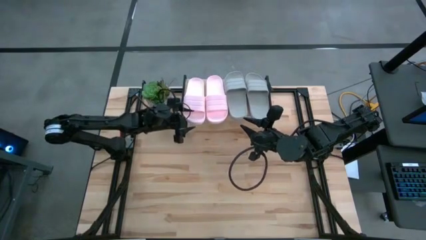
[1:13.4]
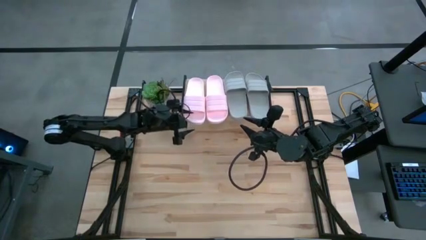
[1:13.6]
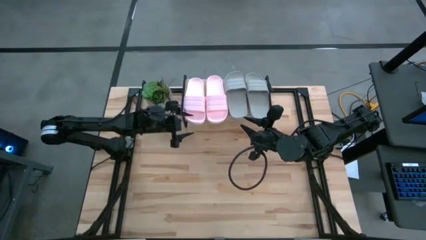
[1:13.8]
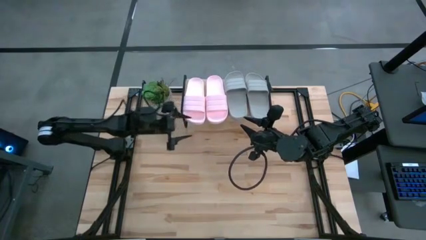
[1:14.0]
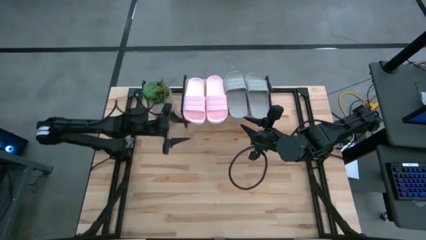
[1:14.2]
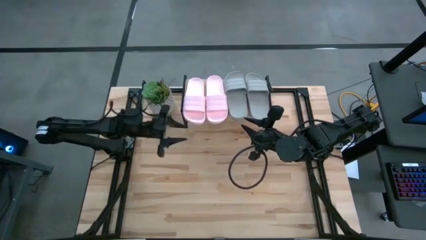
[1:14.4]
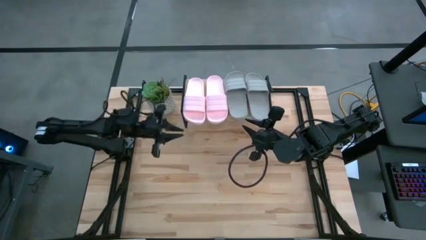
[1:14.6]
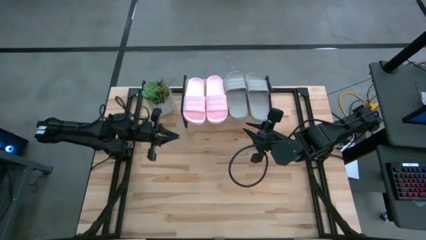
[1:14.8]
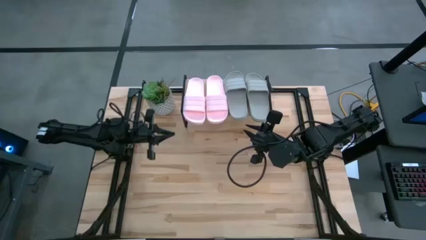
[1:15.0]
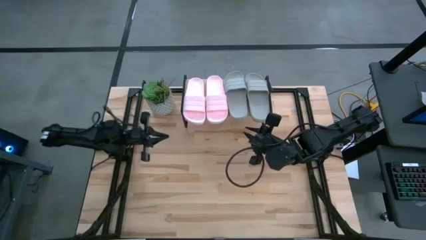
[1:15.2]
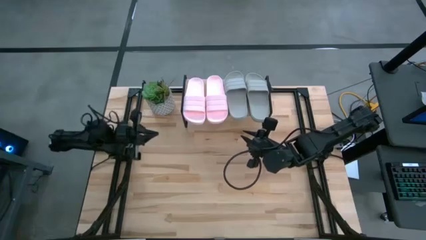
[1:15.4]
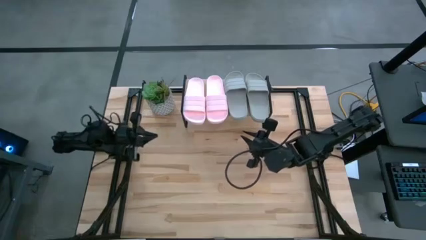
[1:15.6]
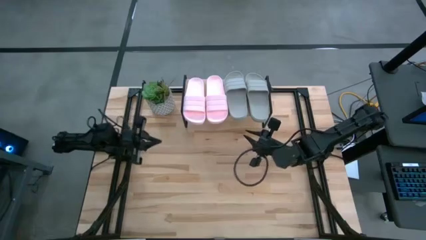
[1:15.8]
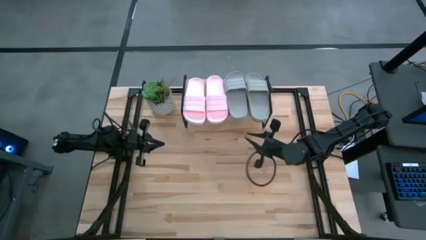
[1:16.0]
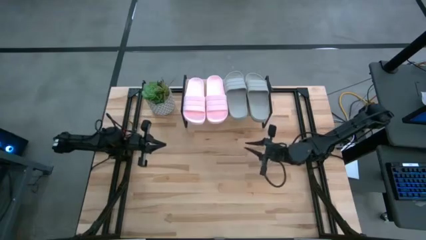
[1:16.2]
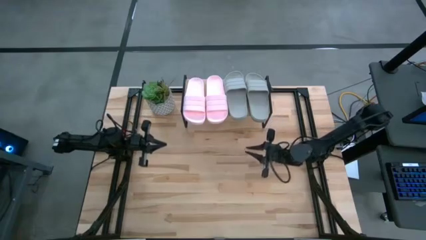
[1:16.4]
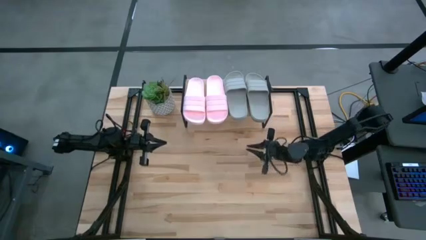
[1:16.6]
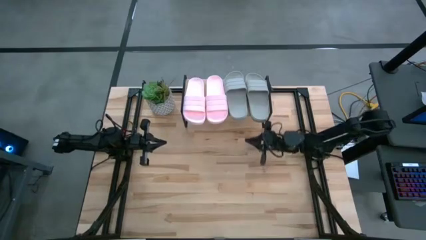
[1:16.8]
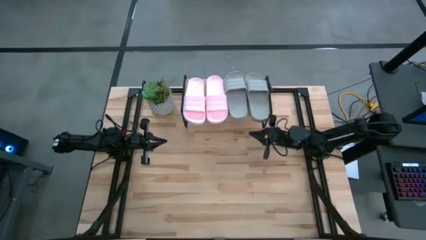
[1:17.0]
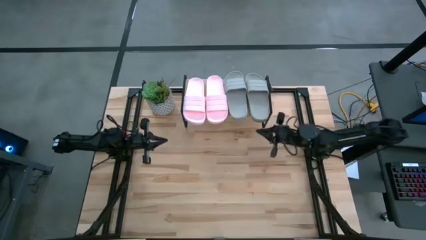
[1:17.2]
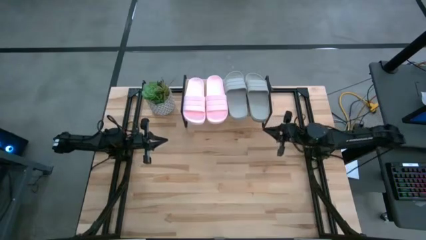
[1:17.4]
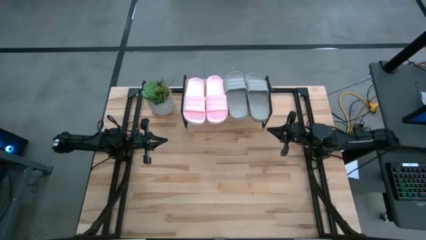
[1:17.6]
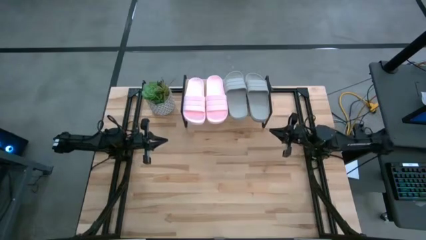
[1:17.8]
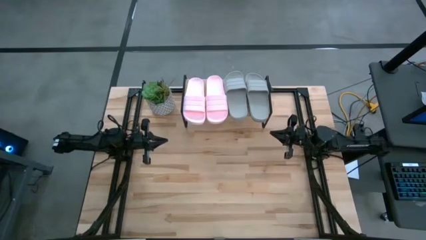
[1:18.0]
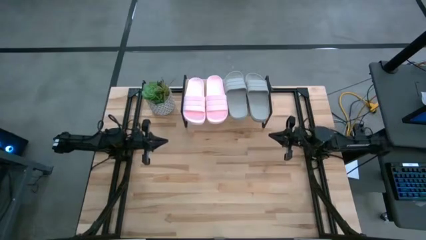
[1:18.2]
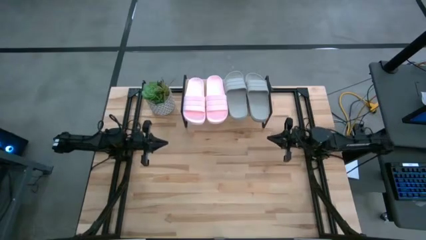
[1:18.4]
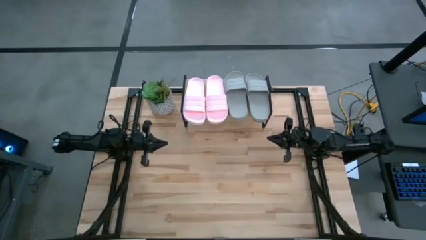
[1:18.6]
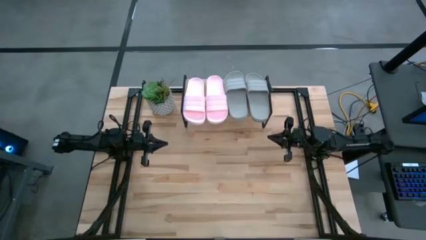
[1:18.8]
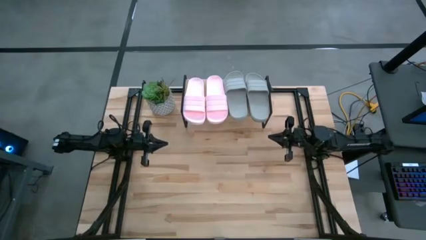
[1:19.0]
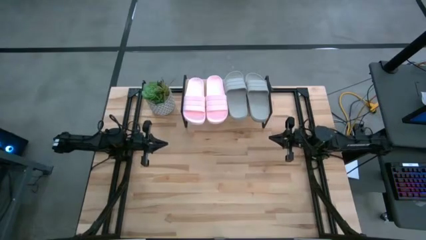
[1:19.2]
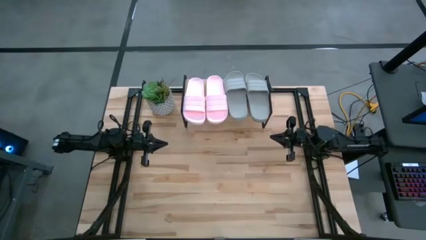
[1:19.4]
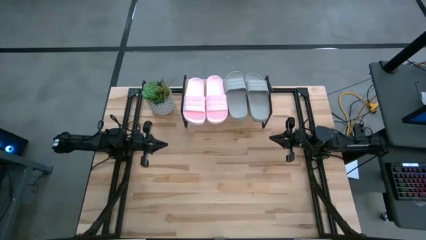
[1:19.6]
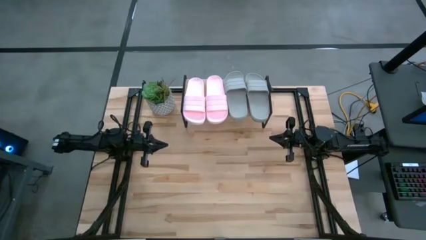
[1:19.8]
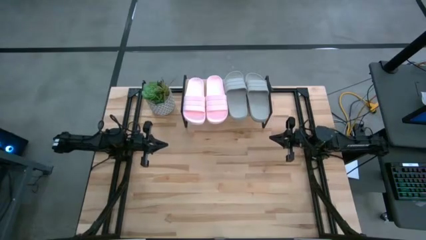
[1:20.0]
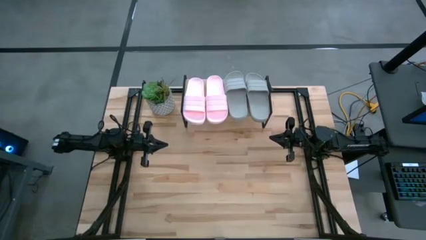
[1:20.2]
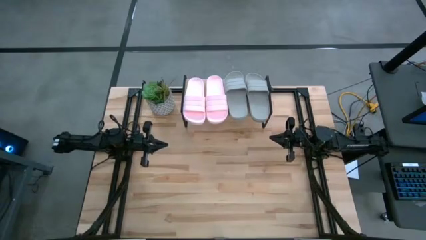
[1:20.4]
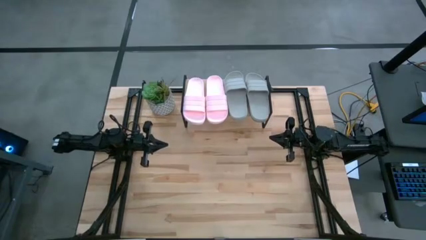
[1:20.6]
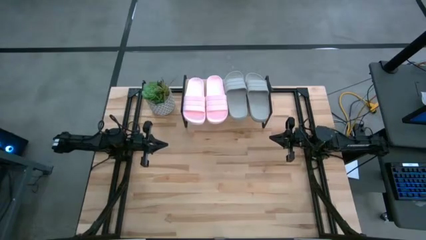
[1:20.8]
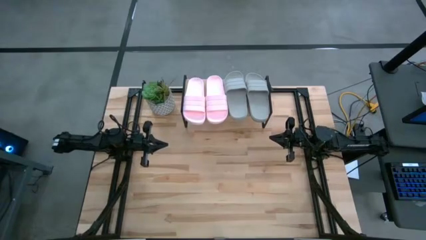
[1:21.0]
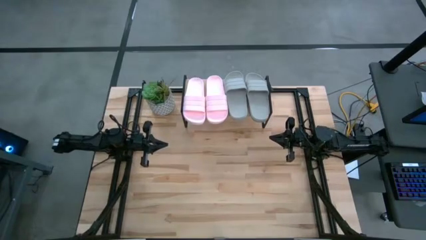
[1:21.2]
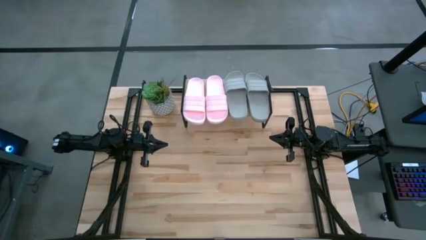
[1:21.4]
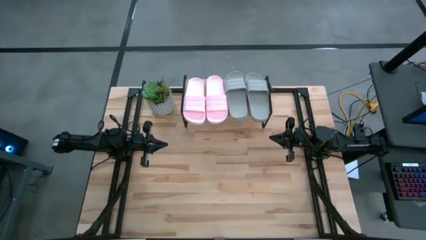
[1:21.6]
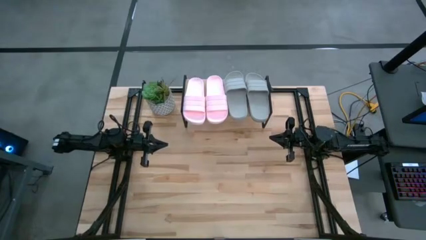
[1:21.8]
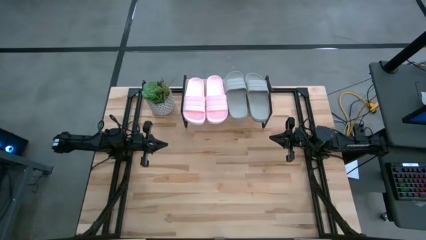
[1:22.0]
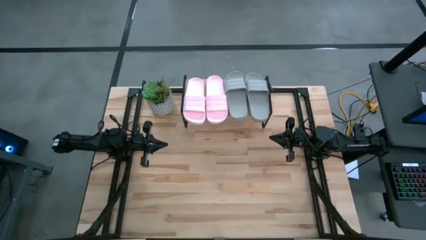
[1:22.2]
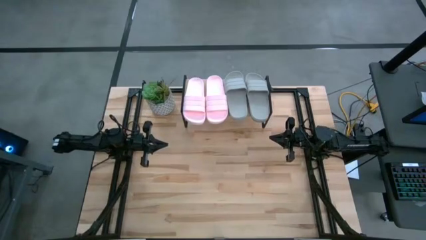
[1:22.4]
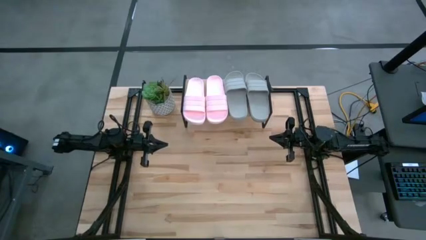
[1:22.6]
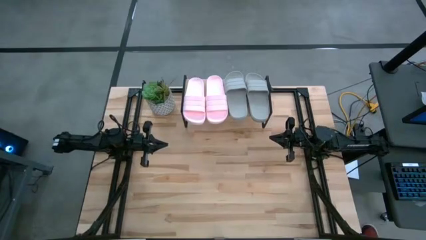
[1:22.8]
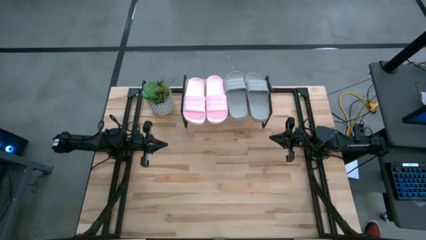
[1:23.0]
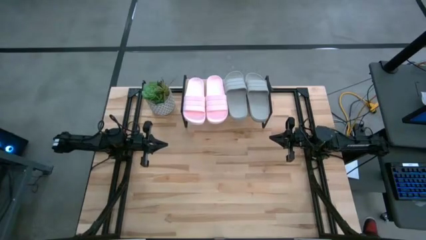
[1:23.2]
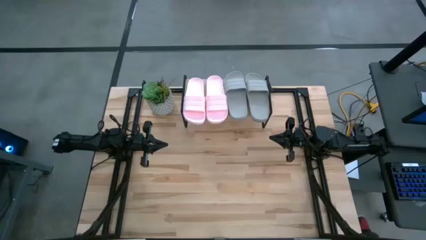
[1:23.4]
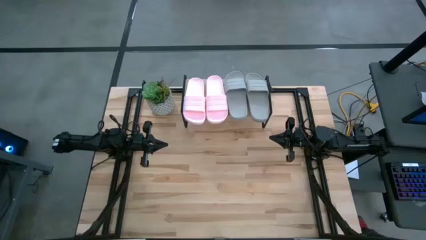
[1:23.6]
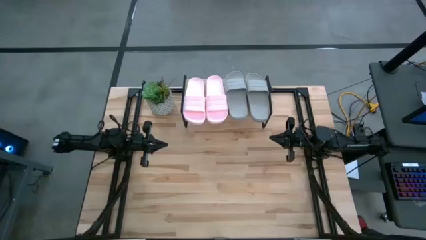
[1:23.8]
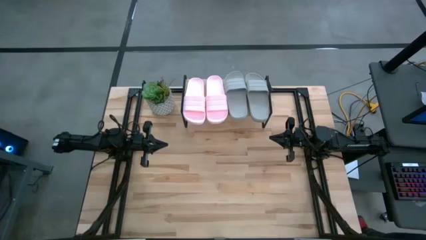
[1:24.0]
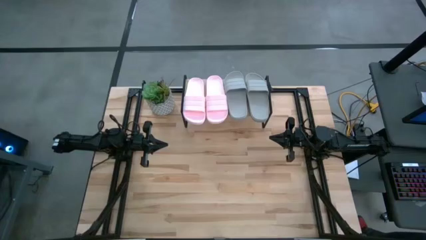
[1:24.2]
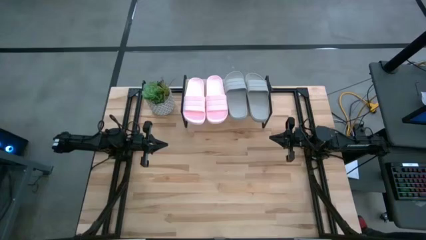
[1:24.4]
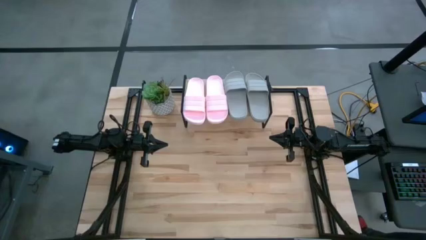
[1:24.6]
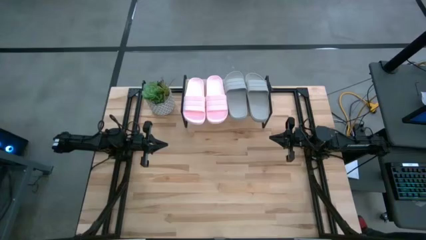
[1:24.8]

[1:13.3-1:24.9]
Task: Pick and place slides into the shelf
Return to Home Position

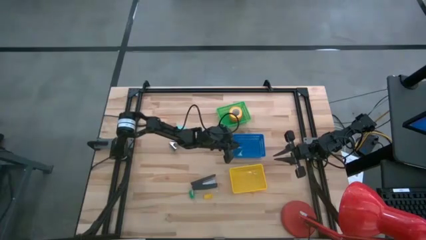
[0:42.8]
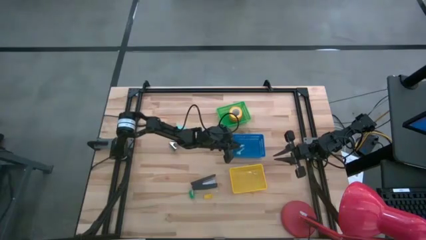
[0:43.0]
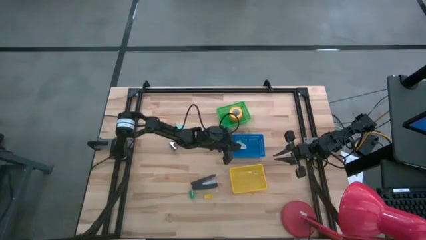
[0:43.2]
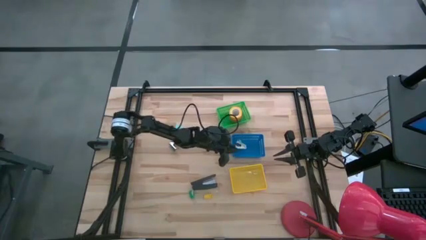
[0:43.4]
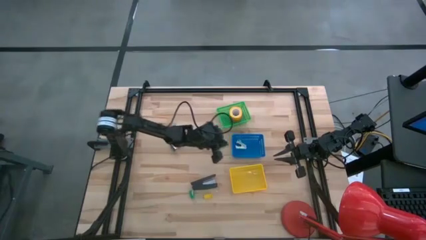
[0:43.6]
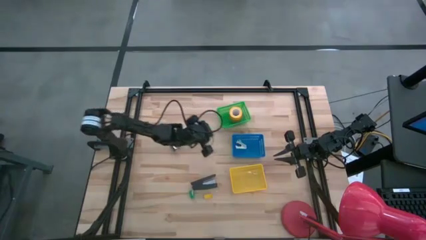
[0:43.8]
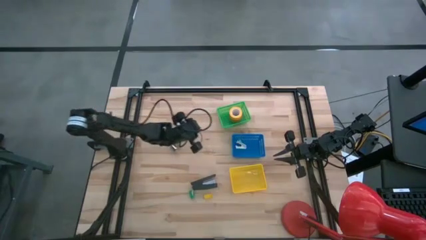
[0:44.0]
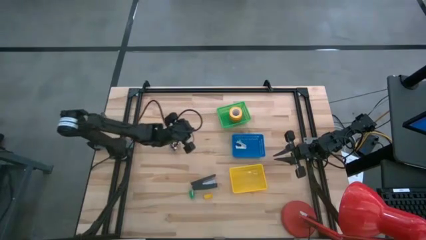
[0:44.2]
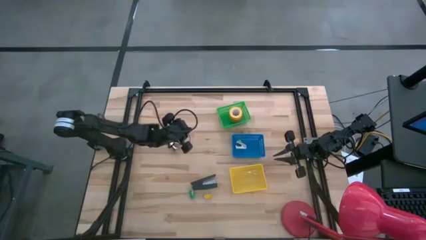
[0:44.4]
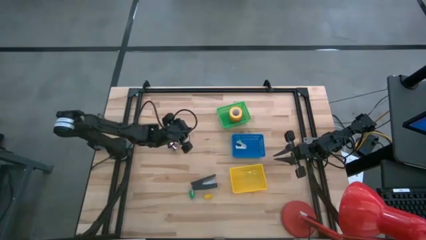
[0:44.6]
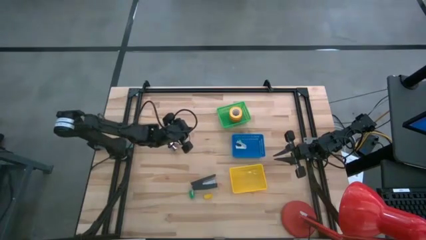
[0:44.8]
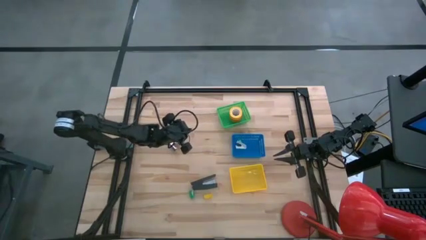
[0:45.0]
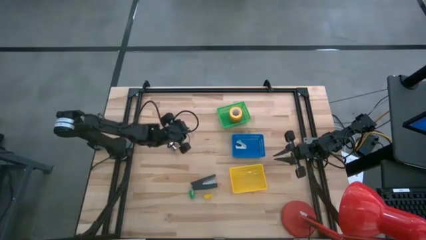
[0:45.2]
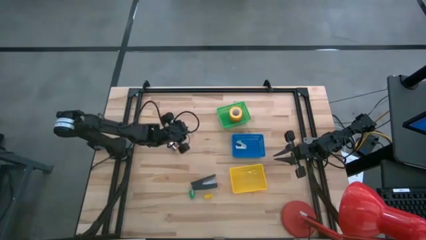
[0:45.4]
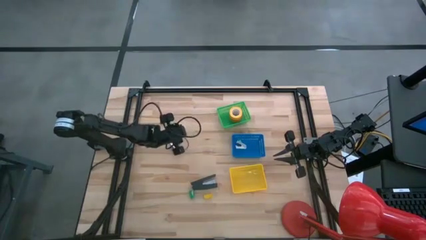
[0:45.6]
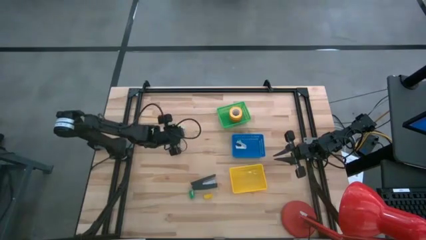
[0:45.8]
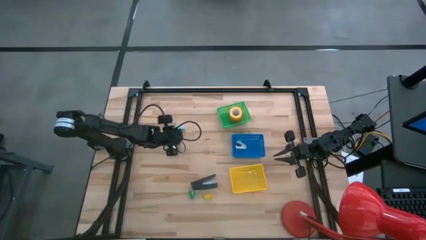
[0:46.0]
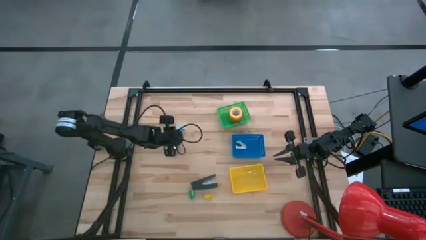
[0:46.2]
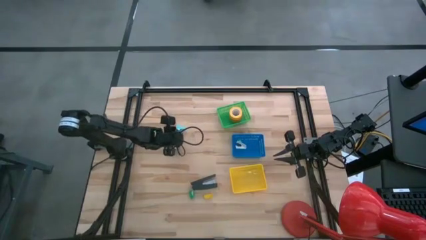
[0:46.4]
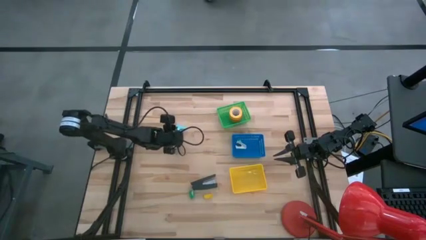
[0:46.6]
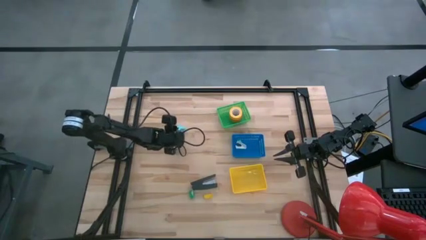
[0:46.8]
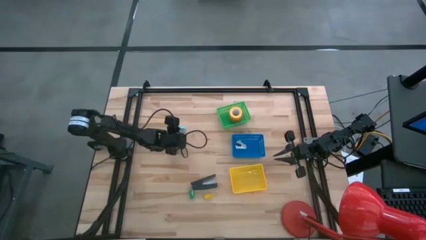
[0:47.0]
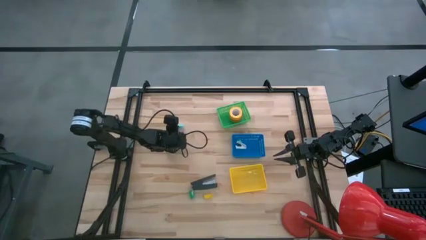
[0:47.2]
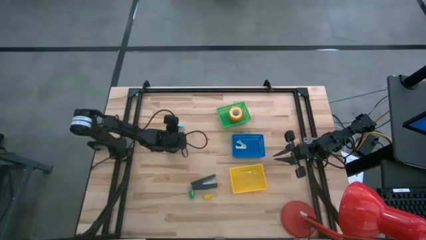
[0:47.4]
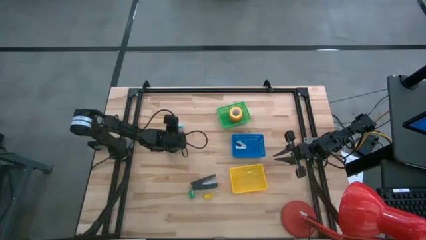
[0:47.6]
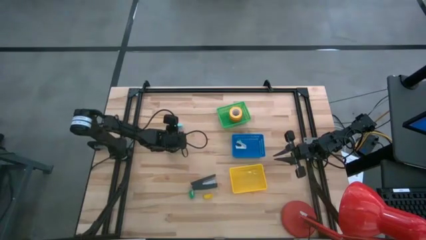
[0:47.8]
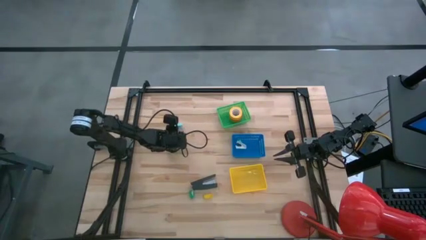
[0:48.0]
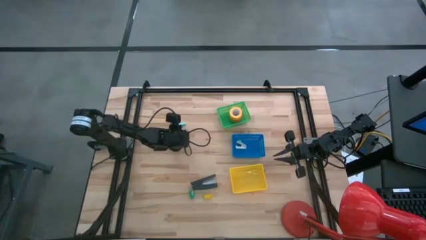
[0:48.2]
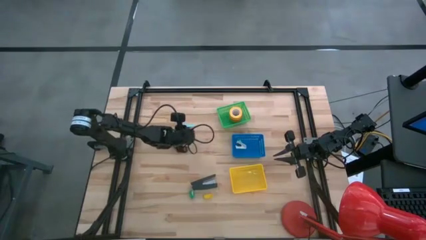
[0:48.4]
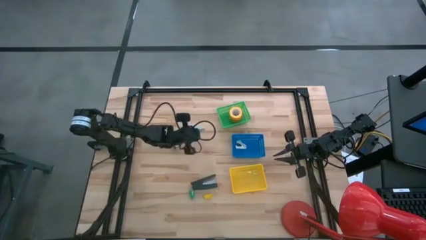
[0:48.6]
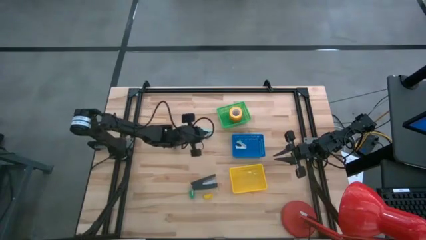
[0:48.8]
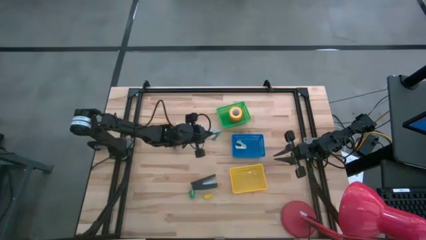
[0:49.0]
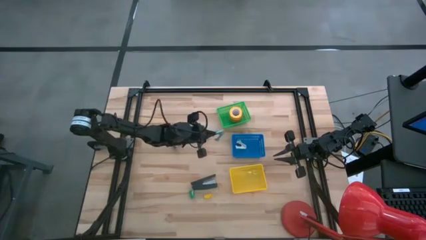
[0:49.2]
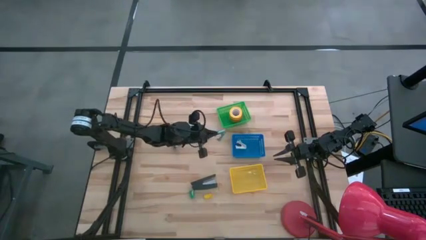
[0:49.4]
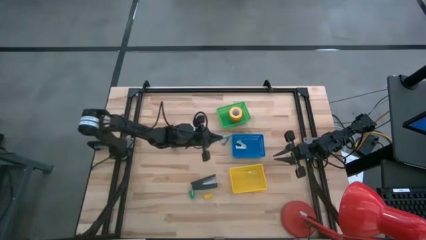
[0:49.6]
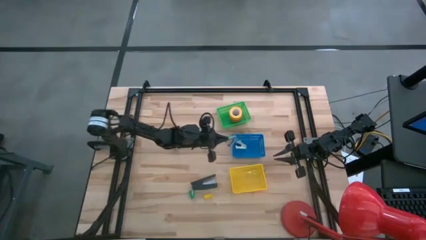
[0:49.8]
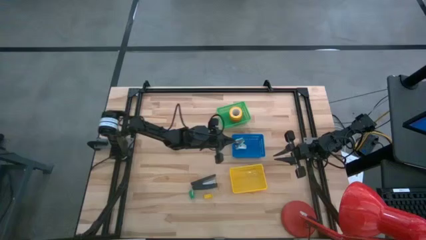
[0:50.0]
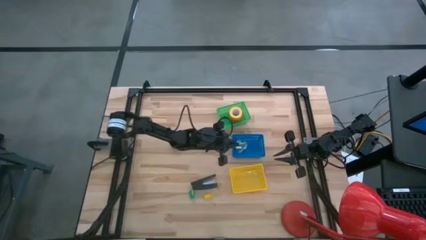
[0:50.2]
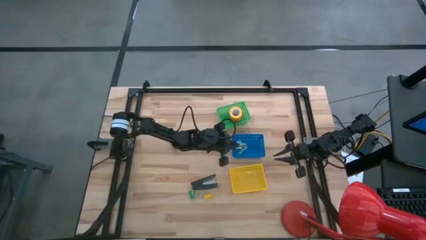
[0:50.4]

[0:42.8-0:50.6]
Task: Pick and place Stapler, Stapler remover, tape
Put the light blue staple remover into the blue bin
